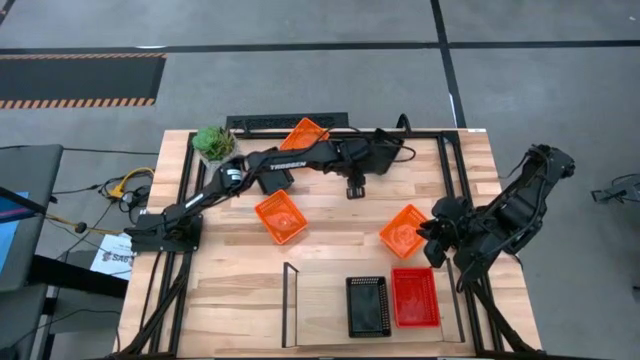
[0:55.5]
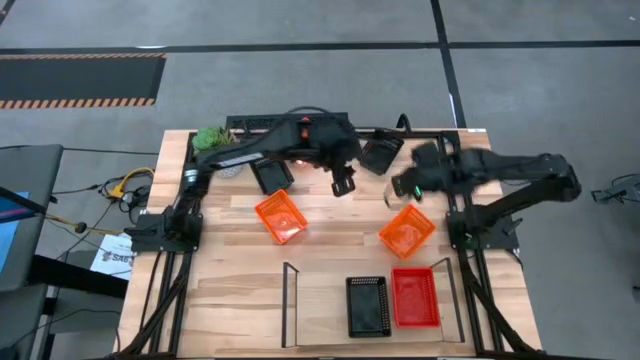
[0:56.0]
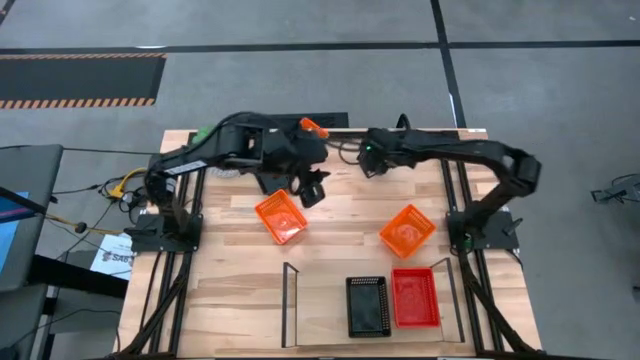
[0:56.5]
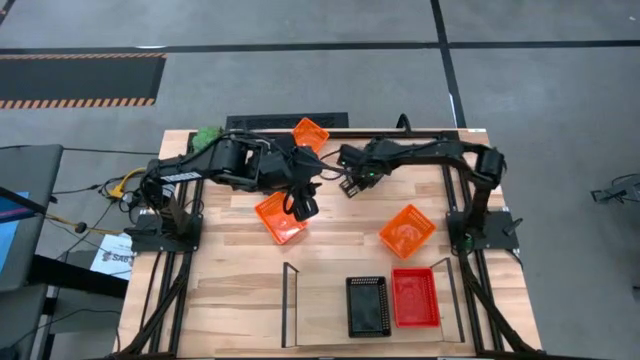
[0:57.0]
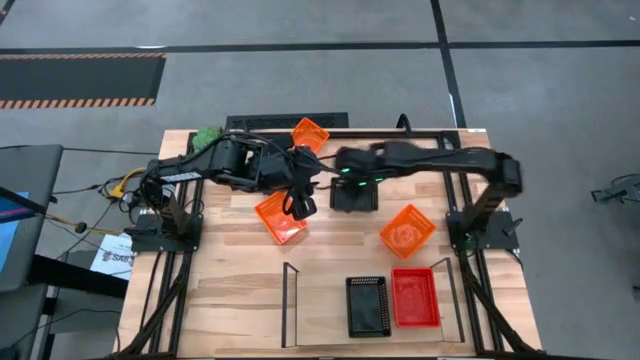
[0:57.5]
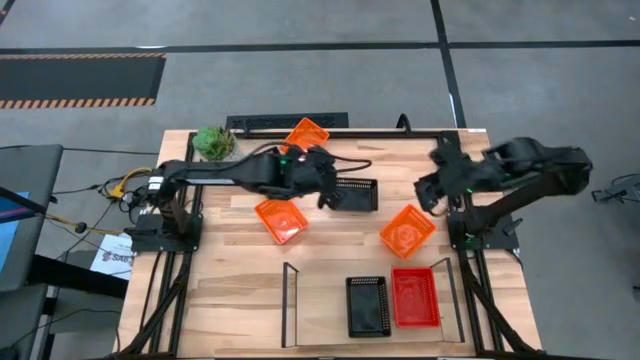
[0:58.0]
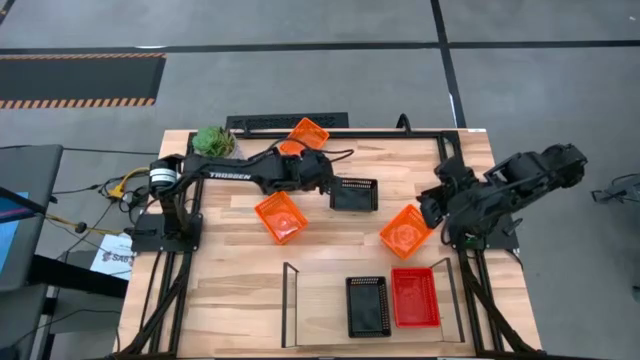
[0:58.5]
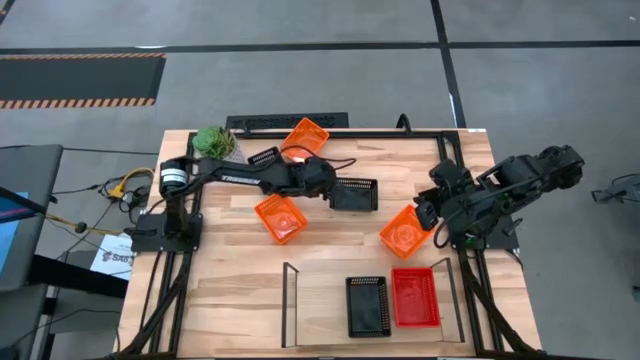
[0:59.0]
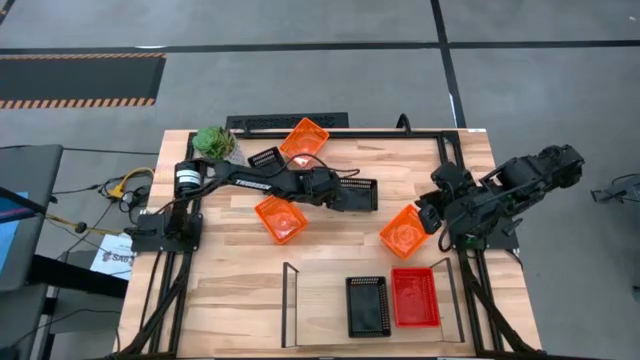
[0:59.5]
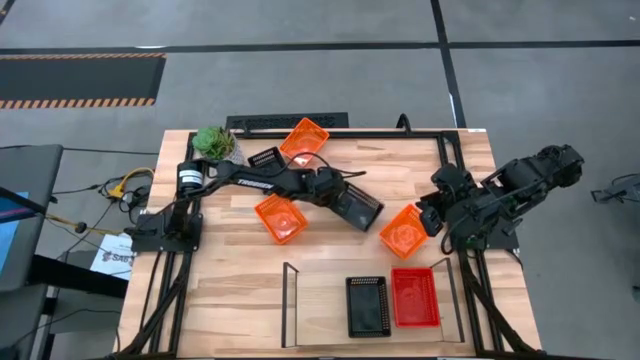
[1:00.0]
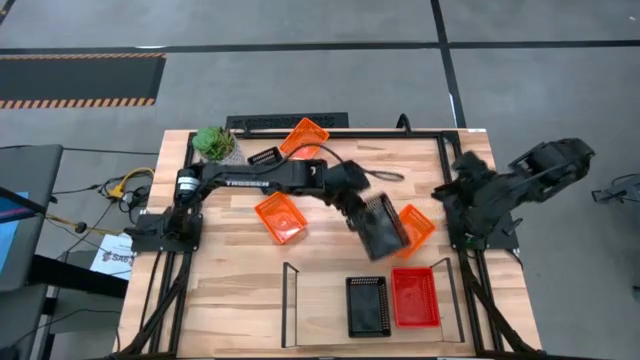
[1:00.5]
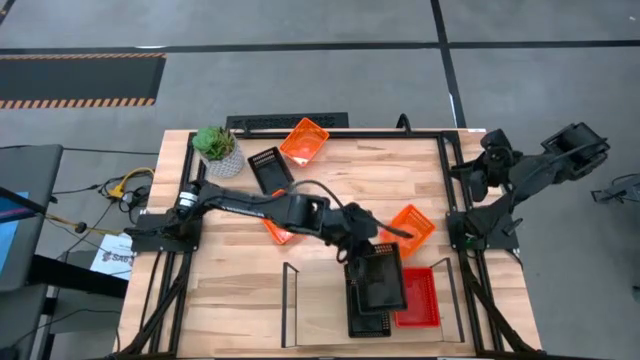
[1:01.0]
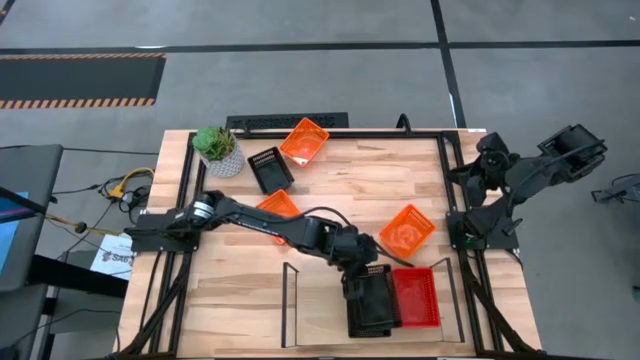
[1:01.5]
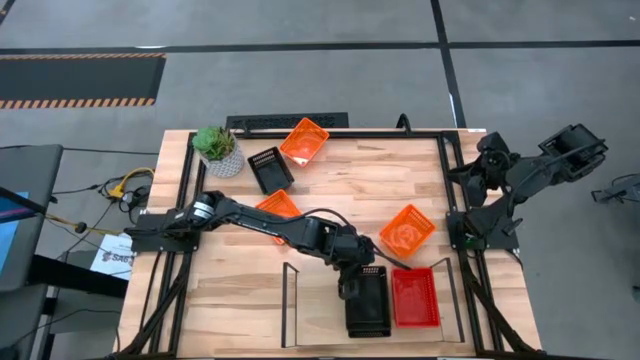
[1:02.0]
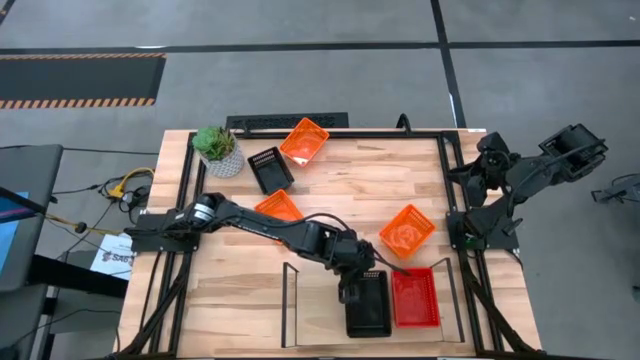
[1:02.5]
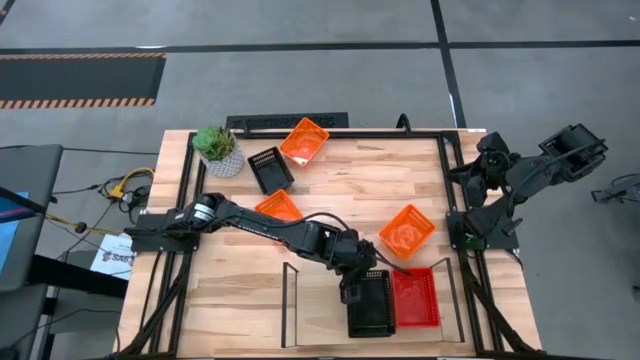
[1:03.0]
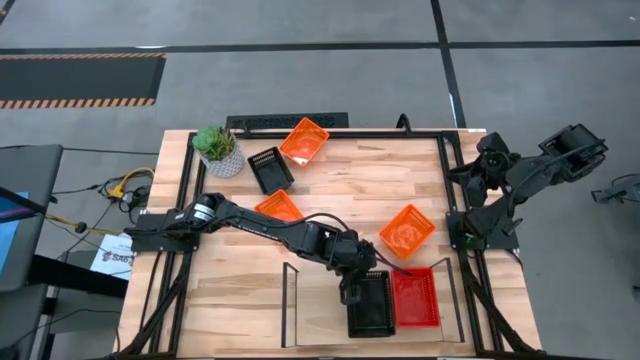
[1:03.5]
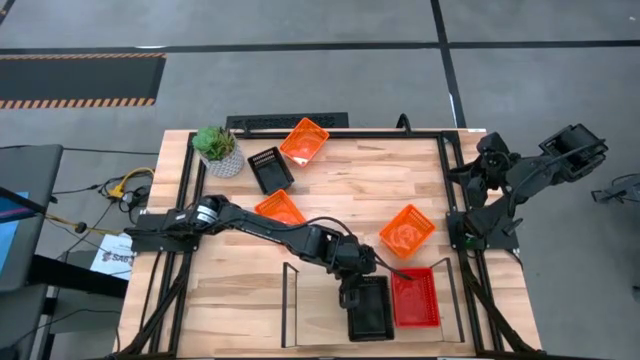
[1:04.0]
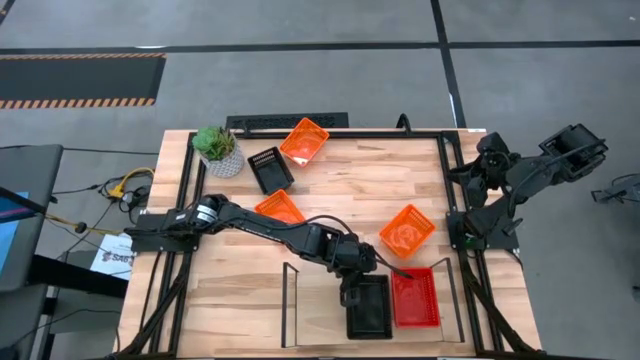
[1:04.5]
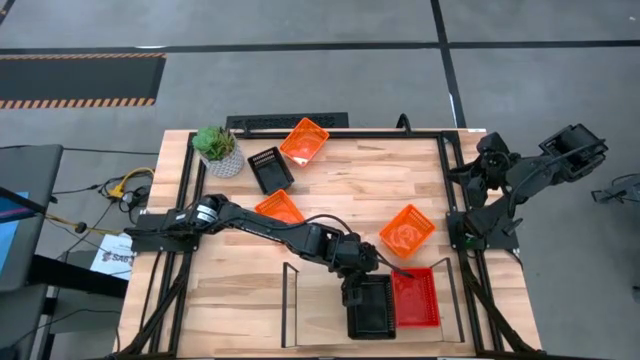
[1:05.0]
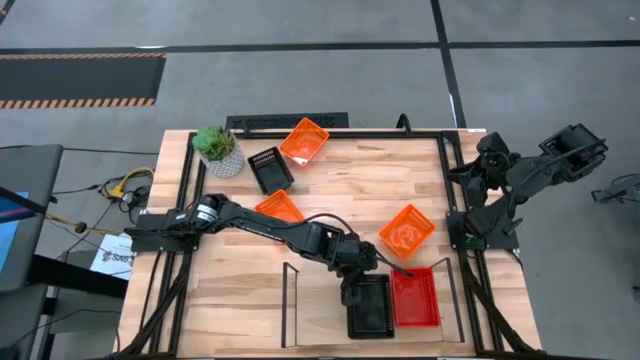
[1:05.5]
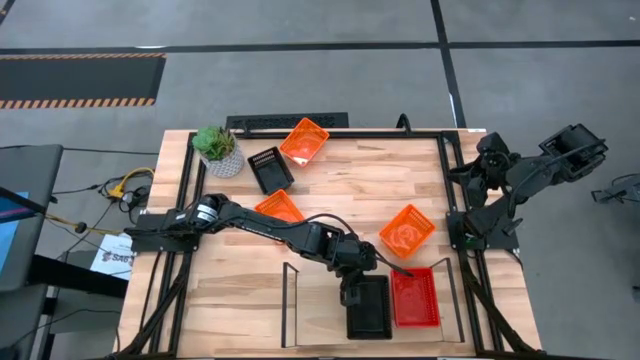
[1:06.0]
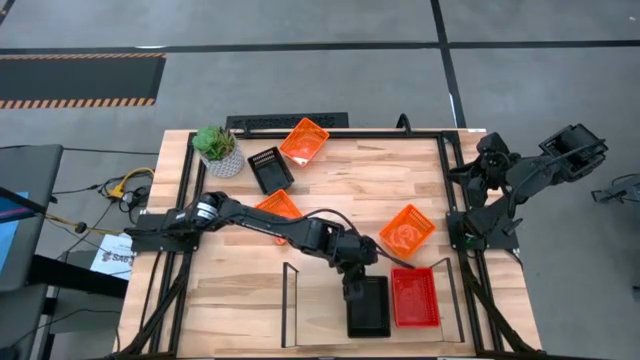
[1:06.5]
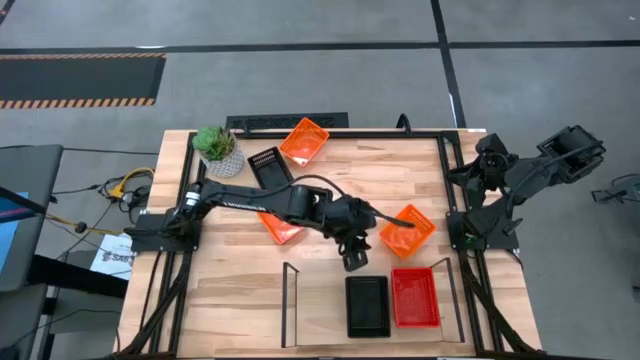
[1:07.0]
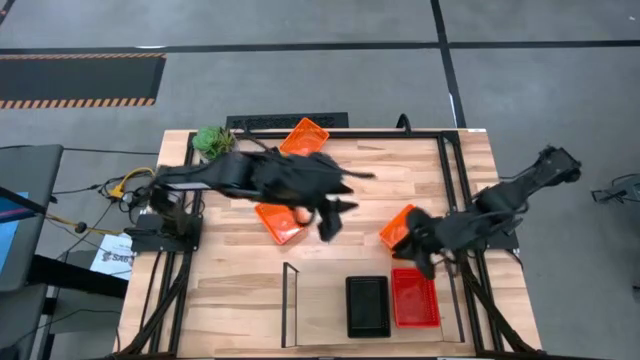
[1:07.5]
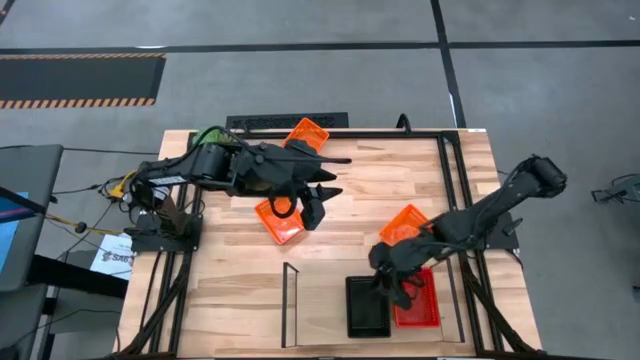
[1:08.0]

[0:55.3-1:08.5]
Task: Stack baskets on shelf by color
Stack the right black bin on top of the black bin on the shelf

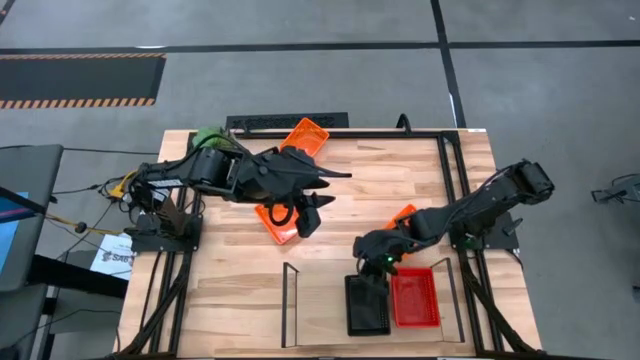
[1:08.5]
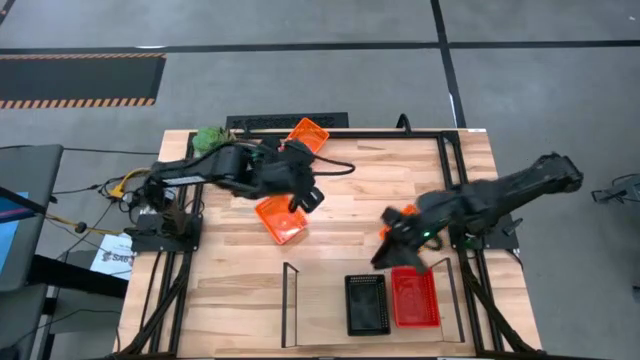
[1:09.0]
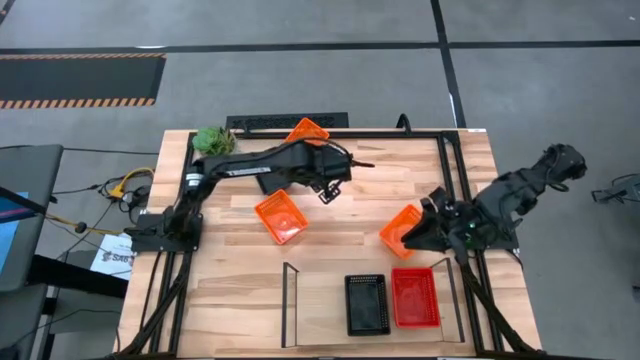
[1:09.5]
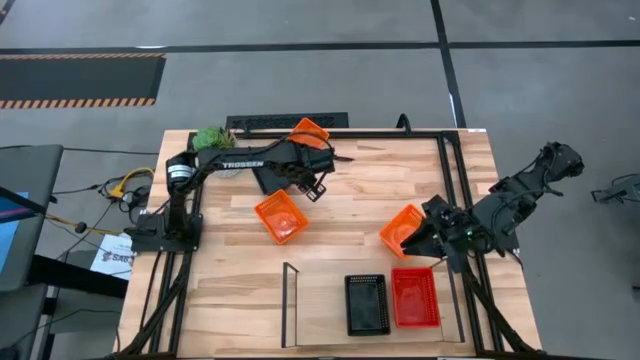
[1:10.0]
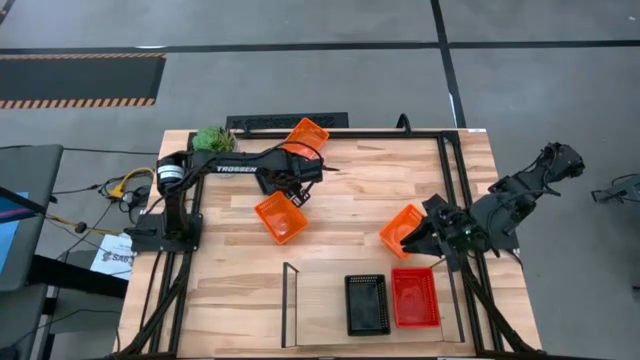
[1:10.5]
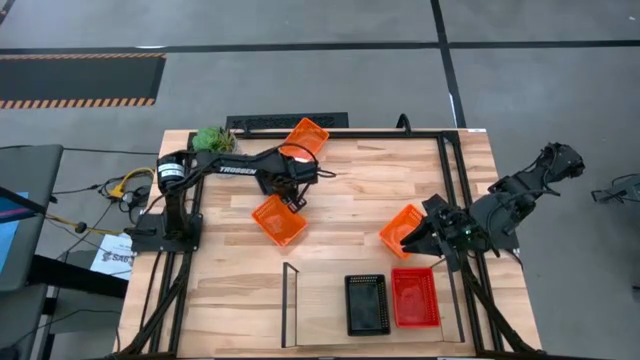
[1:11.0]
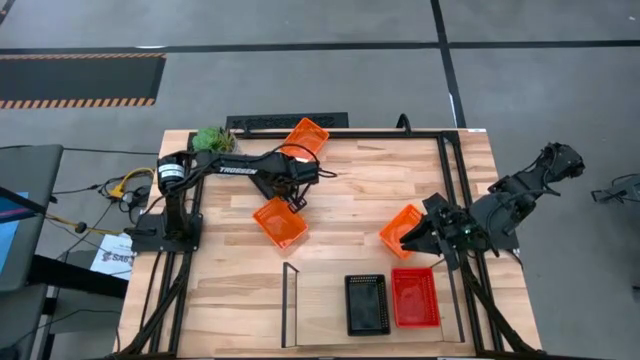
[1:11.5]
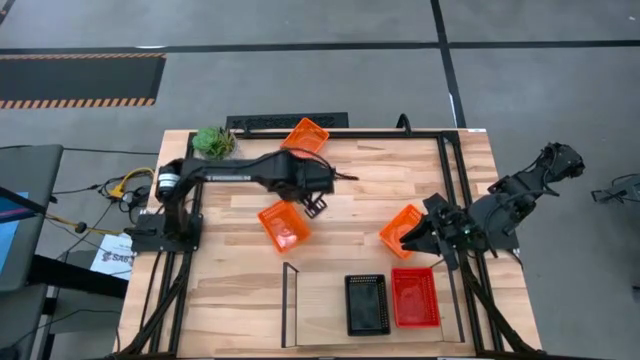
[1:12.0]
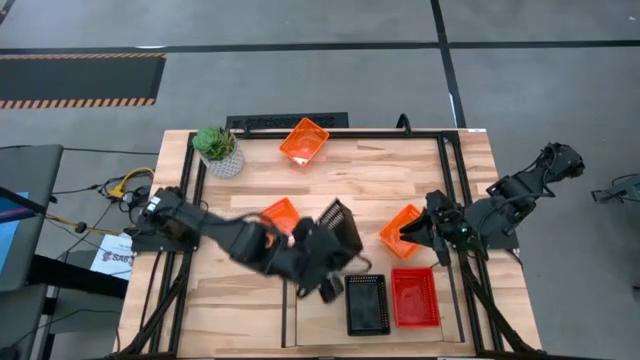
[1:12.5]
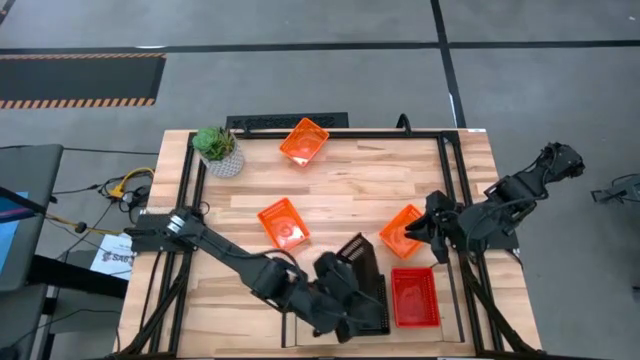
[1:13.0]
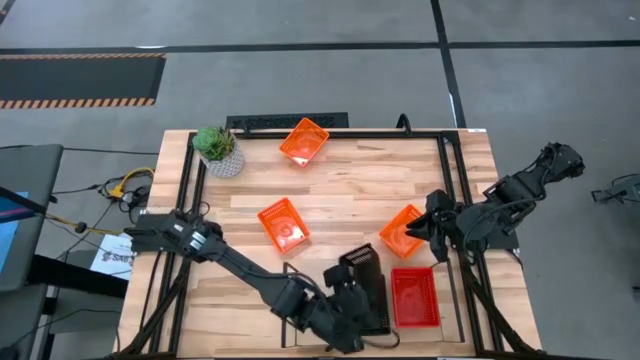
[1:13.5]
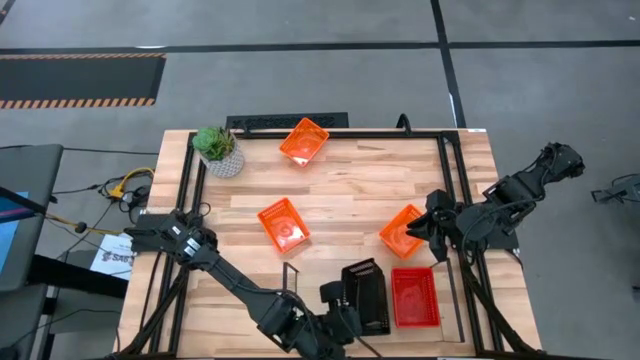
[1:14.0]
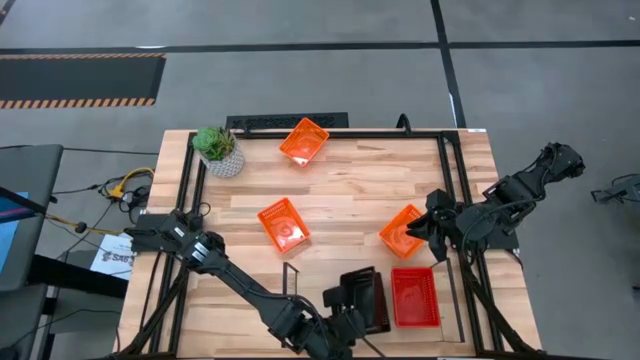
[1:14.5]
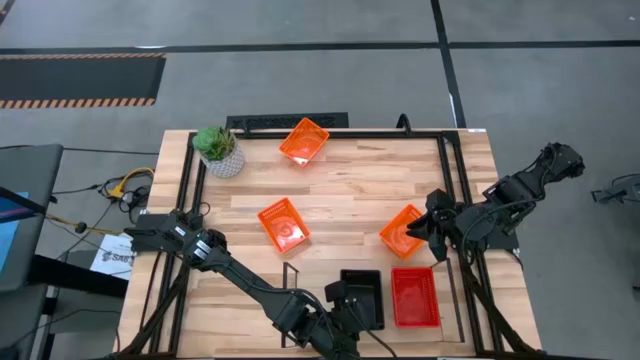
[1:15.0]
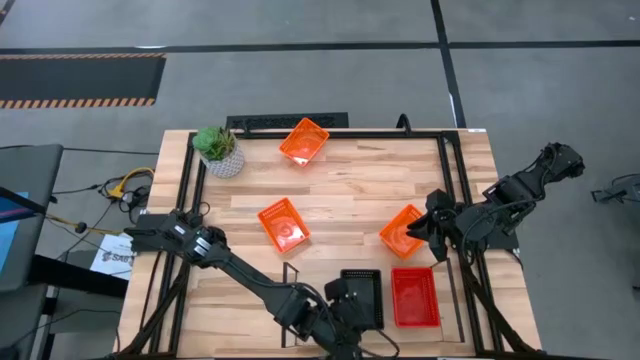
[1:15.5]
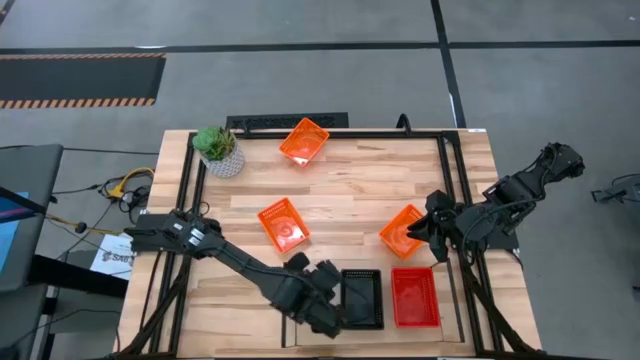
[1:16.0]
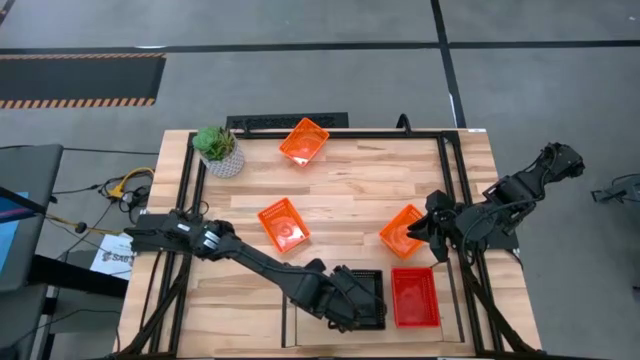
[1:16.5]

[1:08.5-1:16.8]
Stack the black bin on top of the black bin on the shelf
